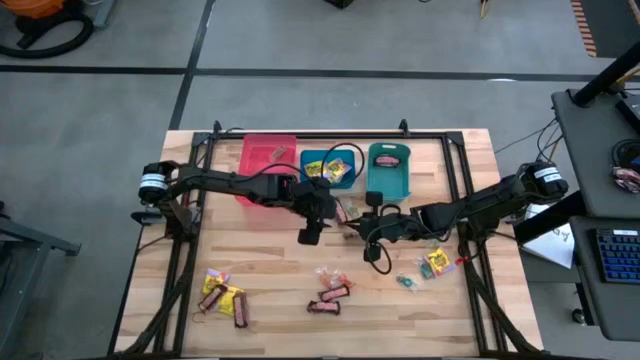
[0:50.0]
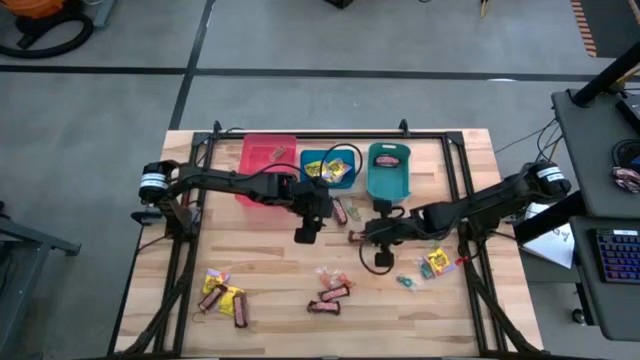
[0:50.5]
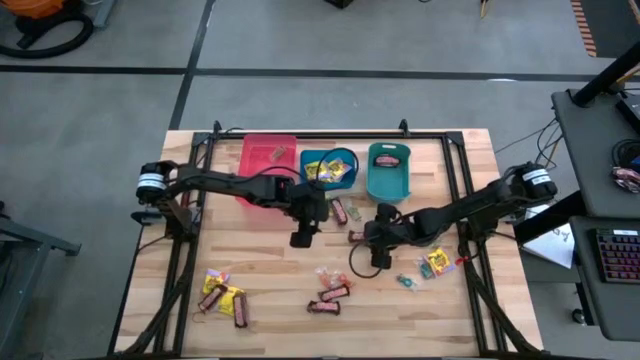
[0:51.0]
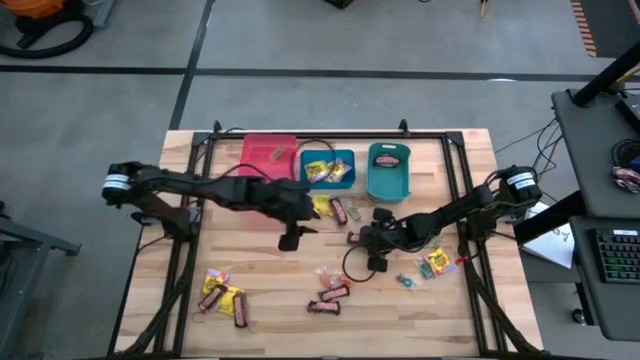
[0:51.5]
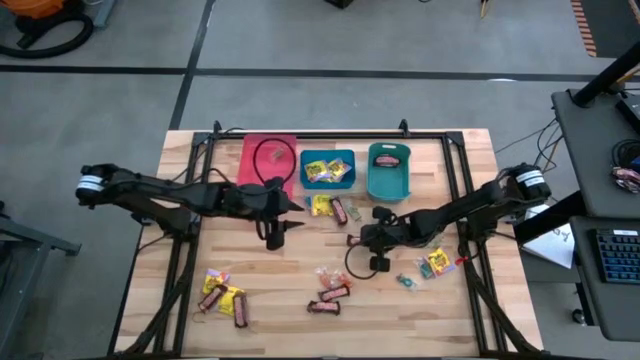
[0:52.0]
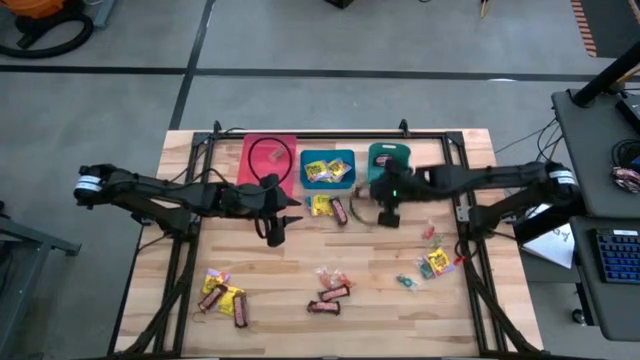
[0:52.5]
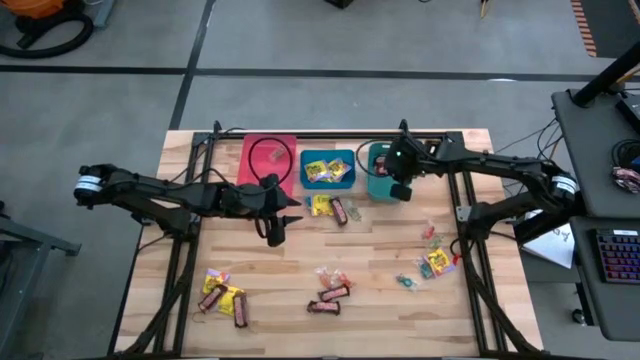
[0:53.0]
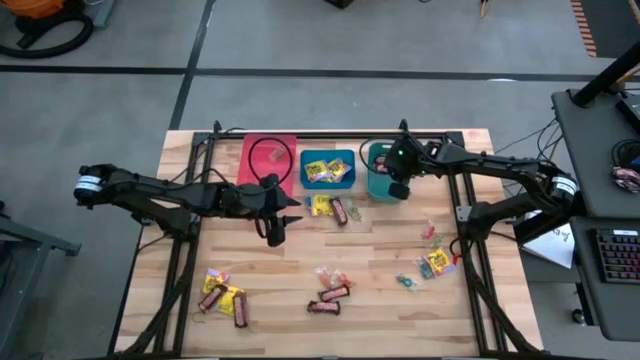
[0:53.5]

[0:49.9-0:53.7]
Task: Sort candy
Put the brown candy into the green bin

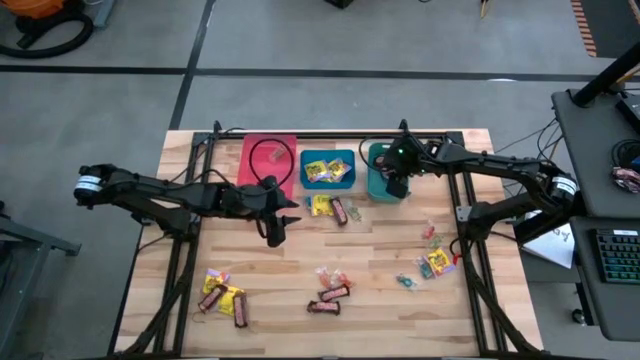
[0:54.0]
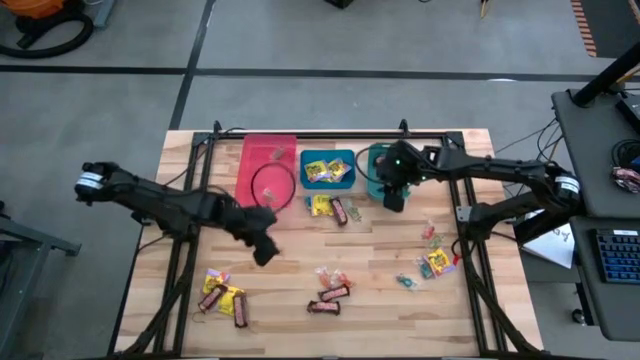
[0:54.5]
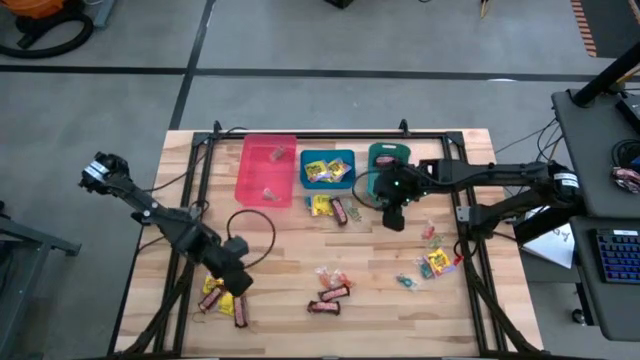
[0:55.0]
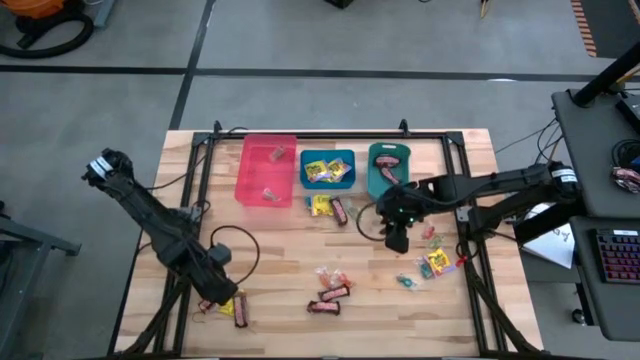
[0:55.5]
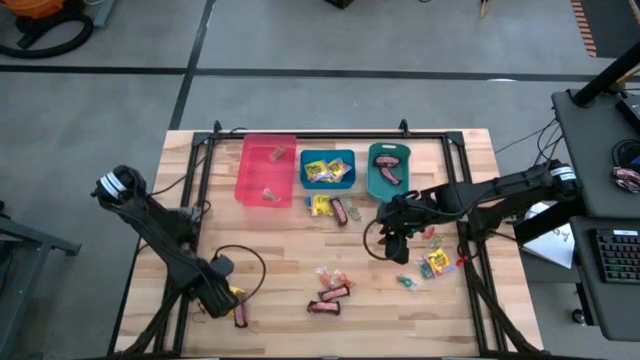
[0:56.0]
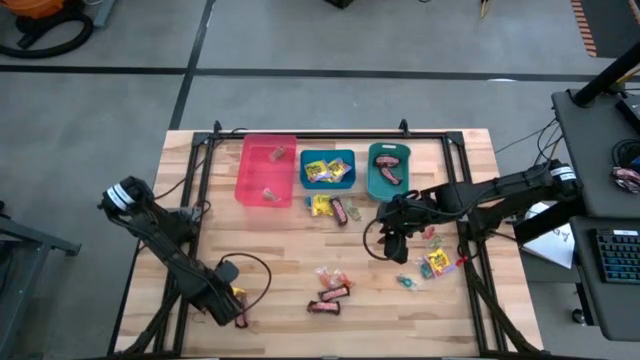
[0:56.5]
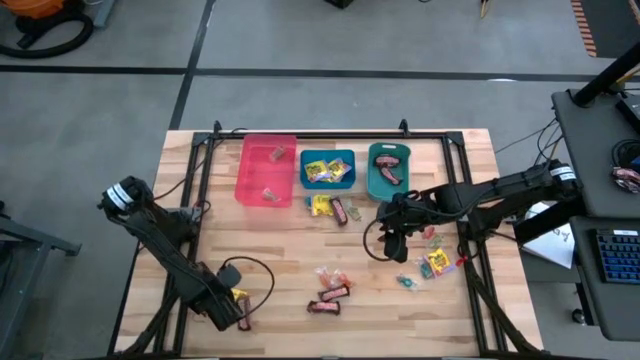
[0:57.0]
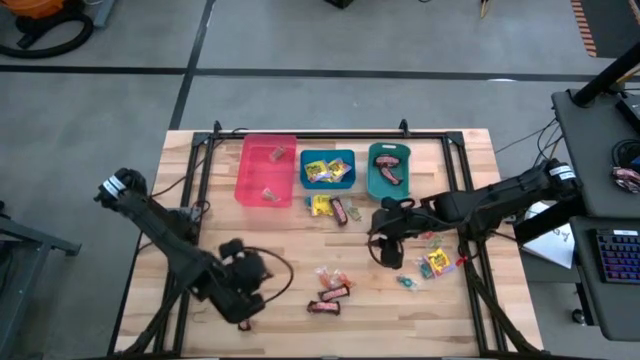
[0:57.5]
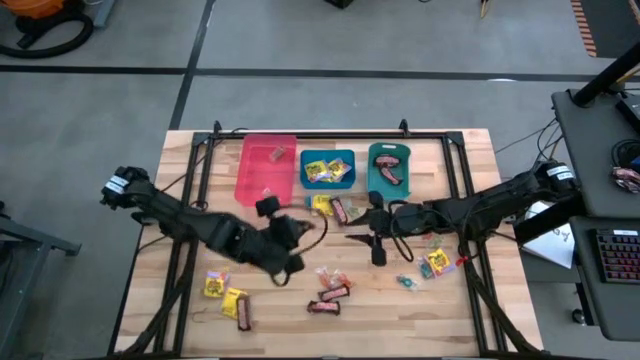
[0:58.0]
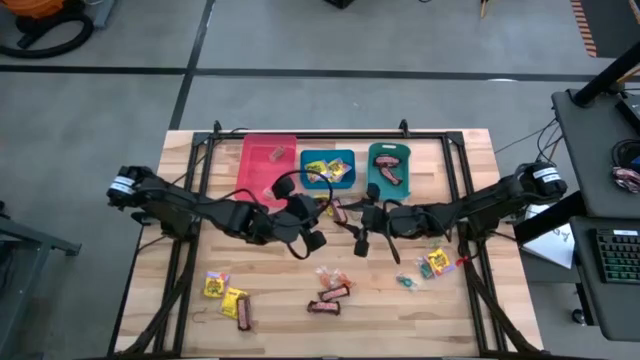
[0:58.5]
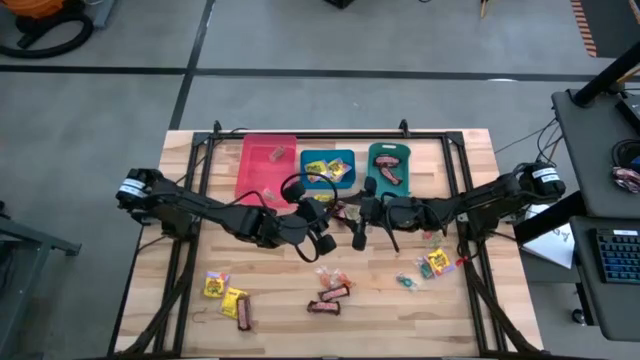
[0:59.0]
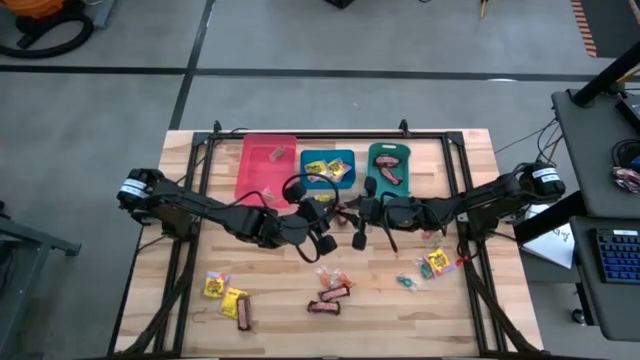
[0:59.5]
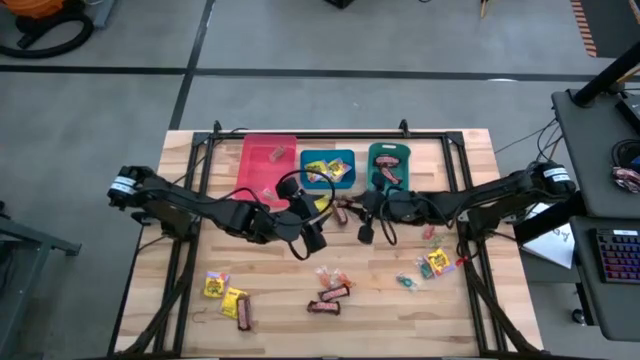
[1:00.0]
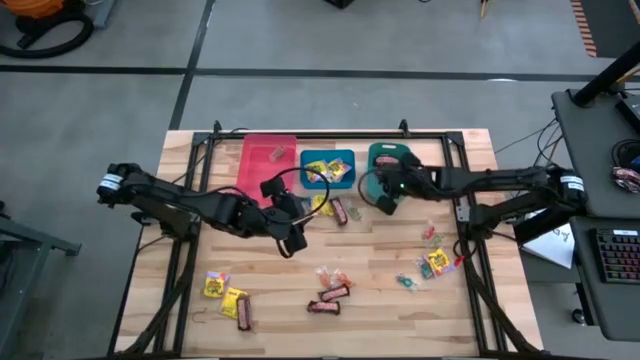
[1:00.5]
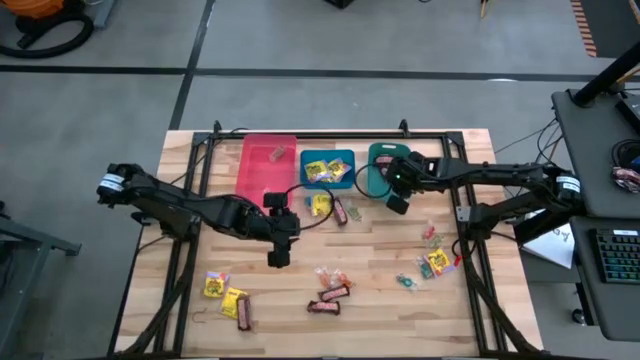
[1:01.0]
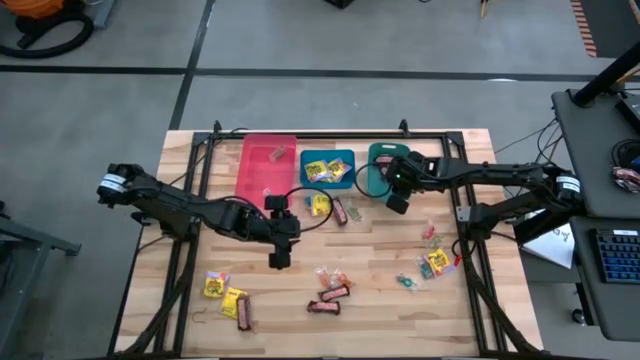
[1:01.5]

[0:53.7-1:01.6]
Put the brown candy into the green bin

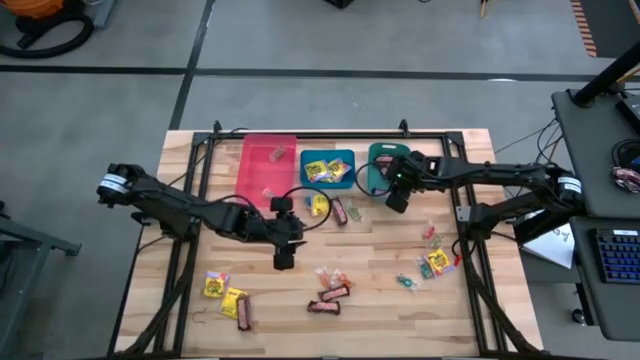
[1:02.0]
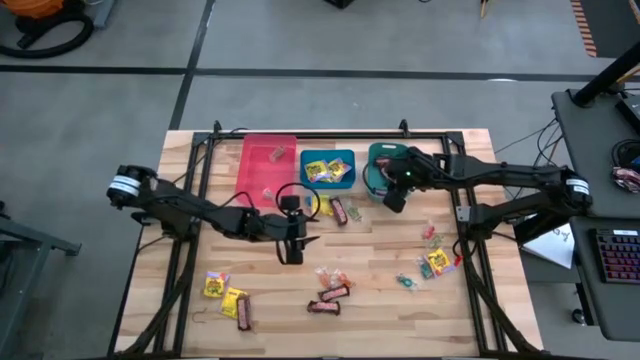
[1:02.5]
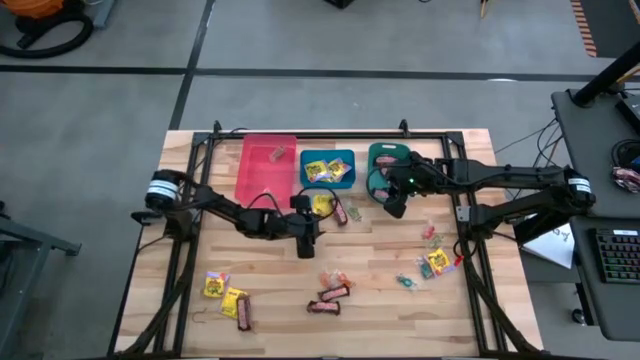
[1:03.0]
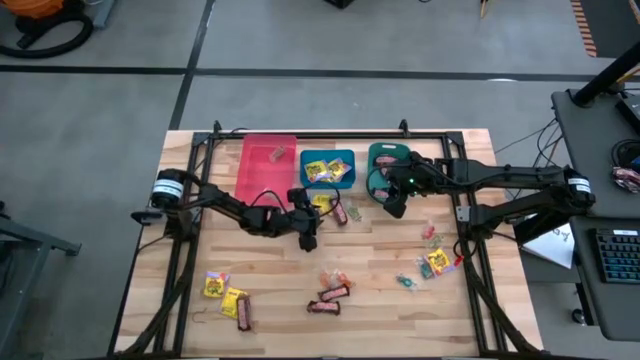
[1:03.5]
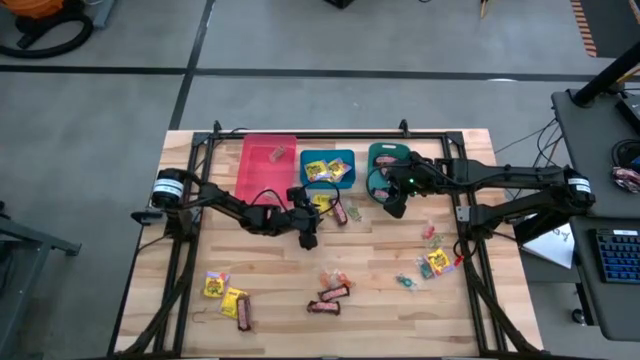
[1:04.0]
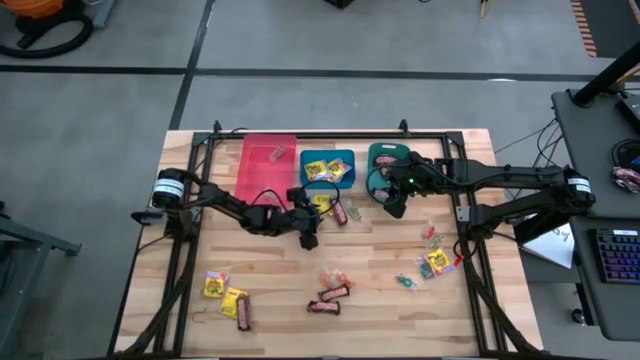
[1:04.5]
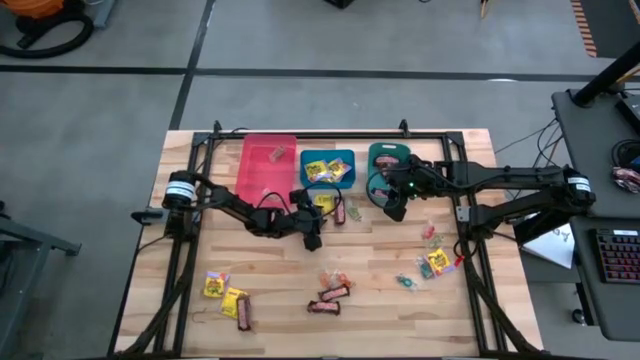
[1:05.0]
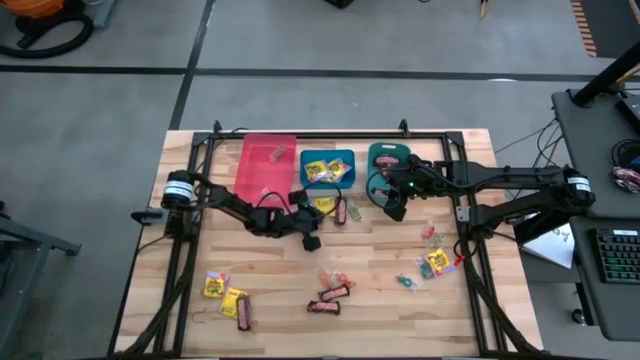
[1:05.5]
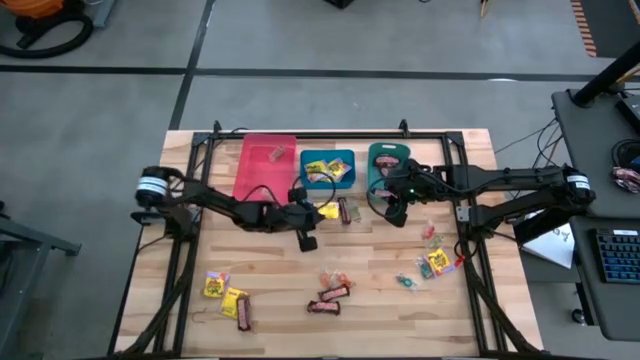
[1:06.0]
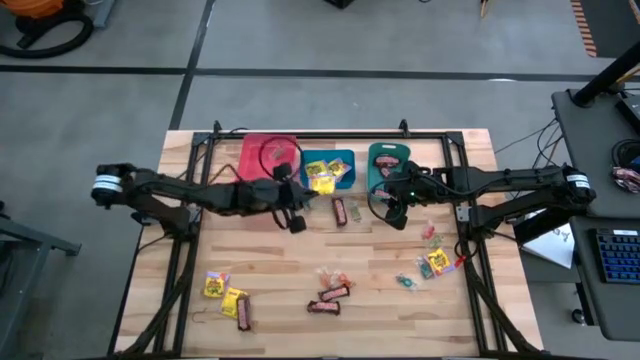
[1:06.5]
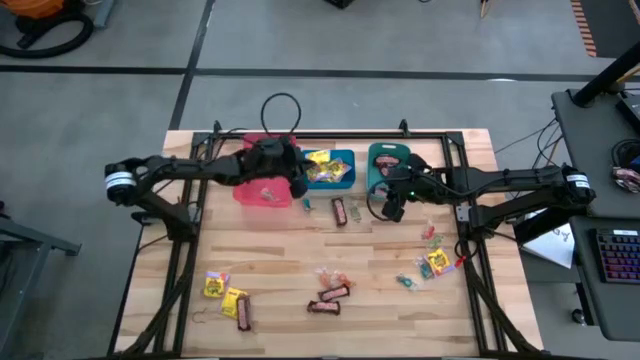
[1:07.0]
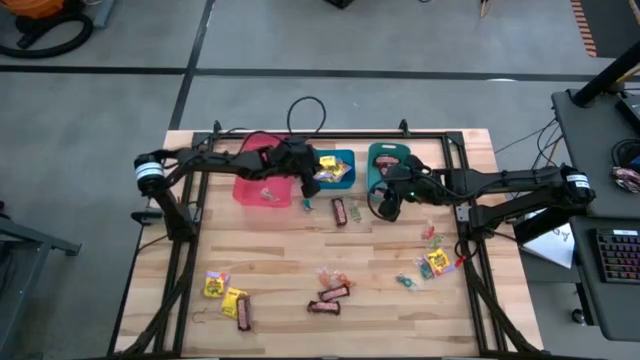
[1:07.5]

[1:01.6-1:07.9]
Put the top yellow candy into the blue bin

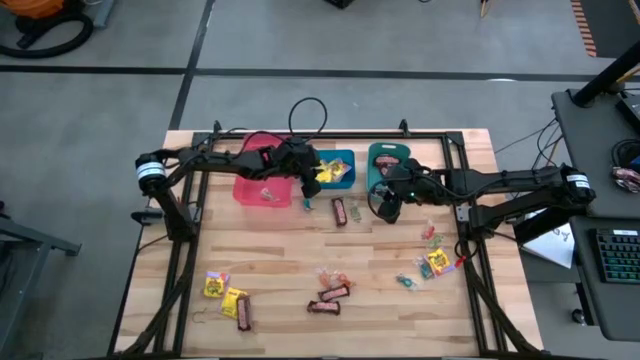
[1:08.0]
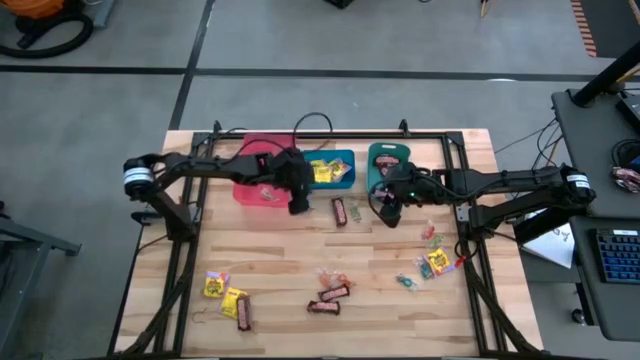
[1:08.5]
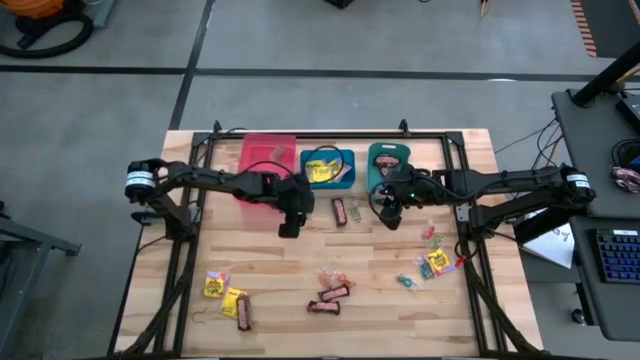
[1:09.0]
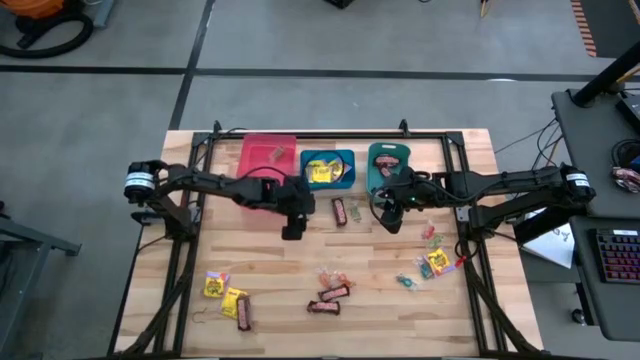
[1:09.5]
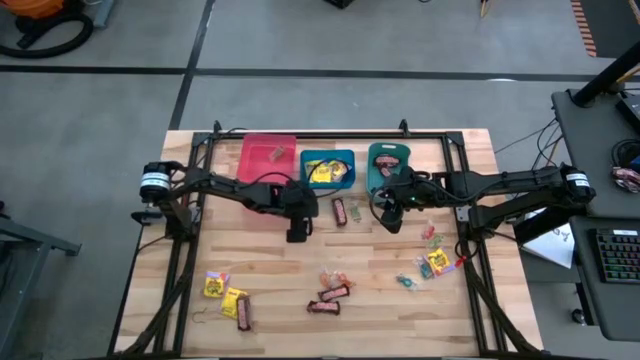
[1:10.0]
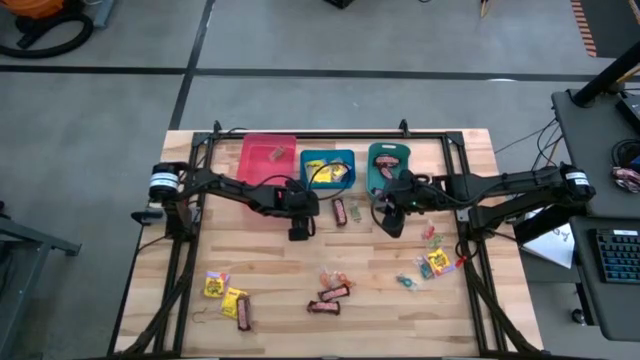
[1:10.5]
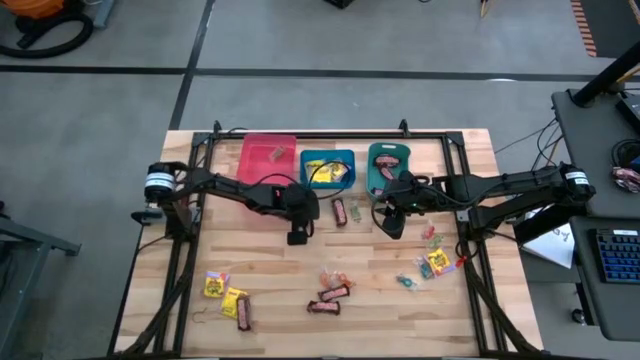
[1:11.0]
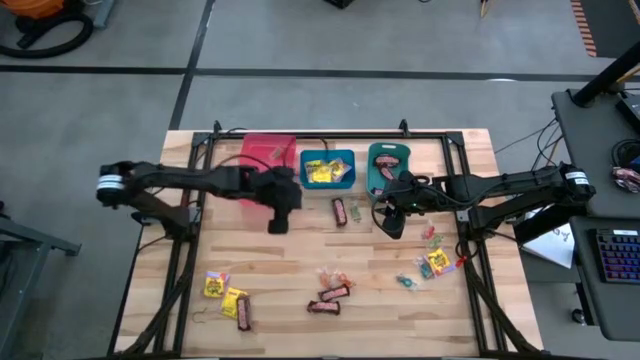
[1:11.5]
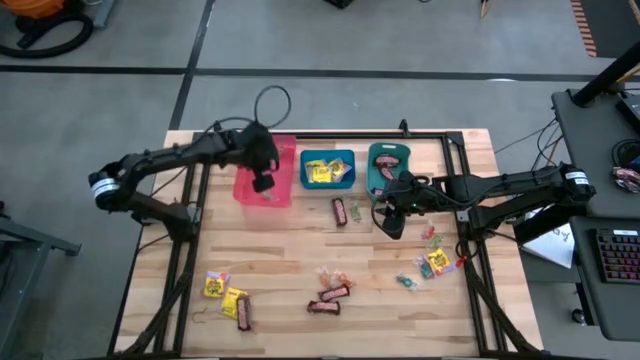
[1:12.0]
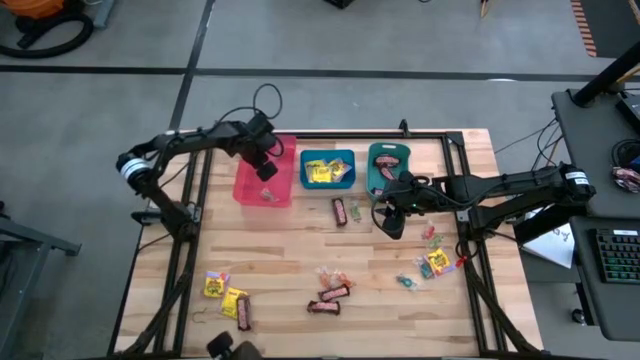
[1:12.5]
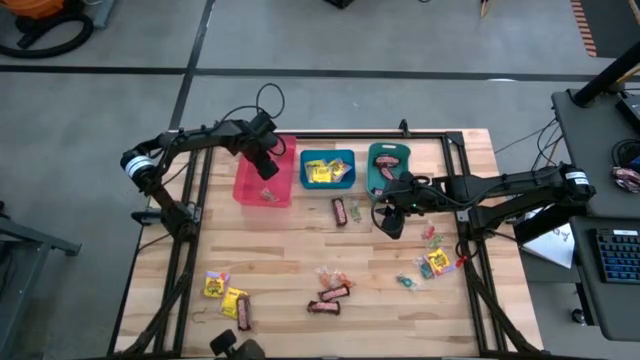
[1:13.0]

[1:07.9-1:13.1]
Put the top blue candy into the blue bin
